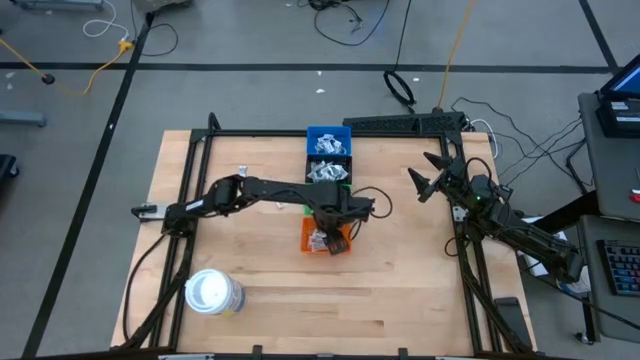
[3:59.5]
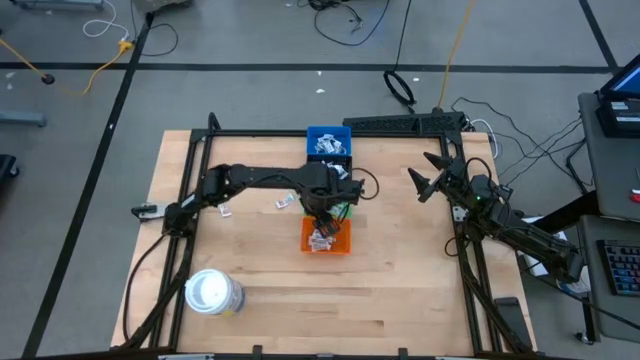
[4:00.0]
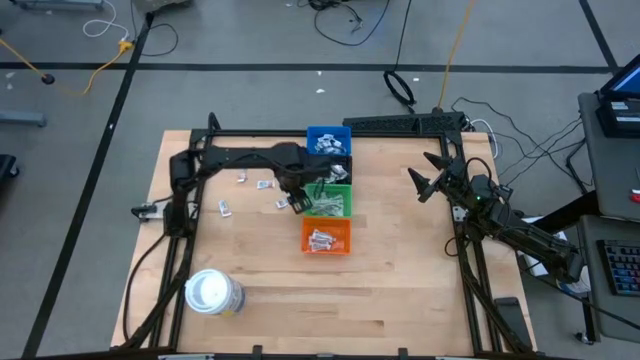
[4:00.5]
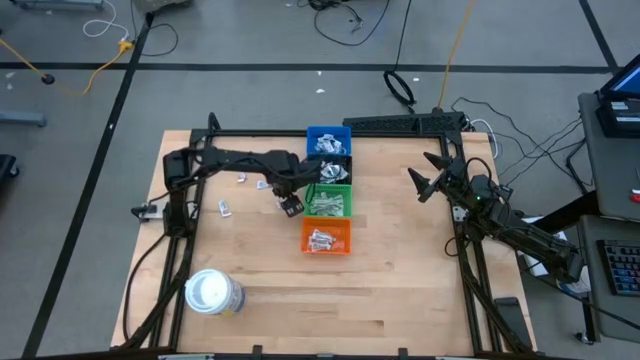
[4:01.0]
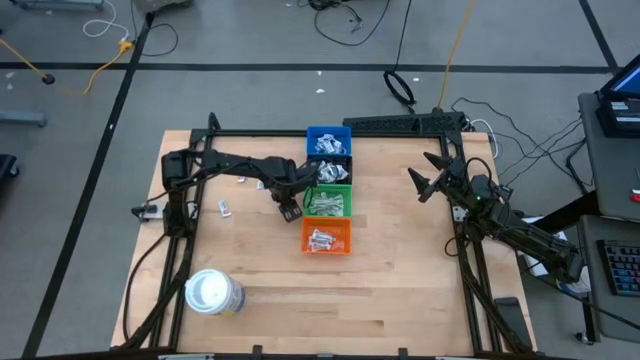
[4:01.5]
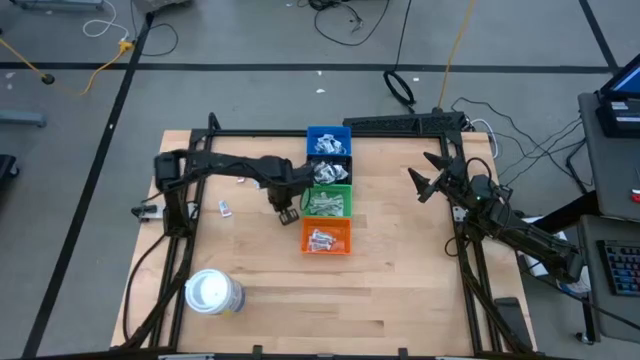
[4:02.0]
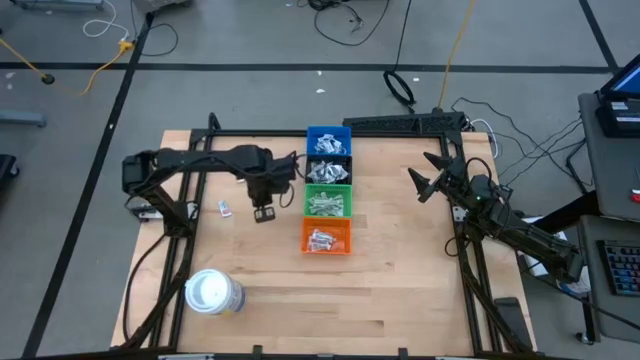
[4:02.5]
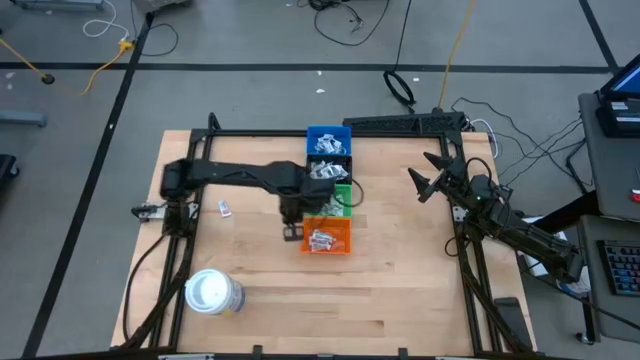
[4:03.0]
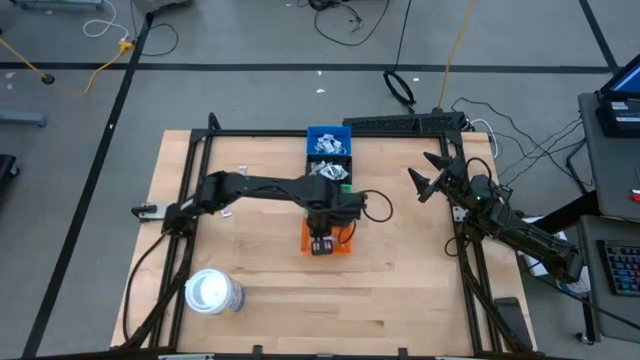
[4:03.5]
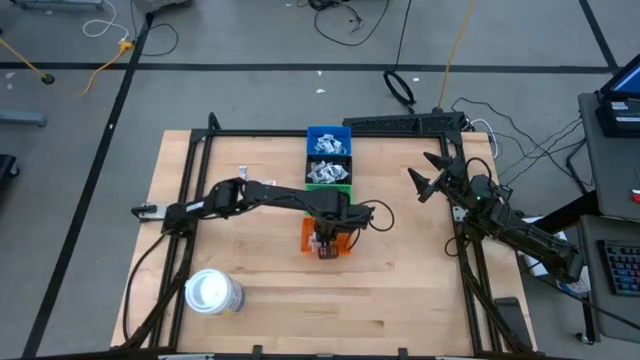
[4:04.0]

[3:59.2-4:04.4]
Task: Pick & Place First Aid Supplies
Put the orange ointment pack into the orange bin

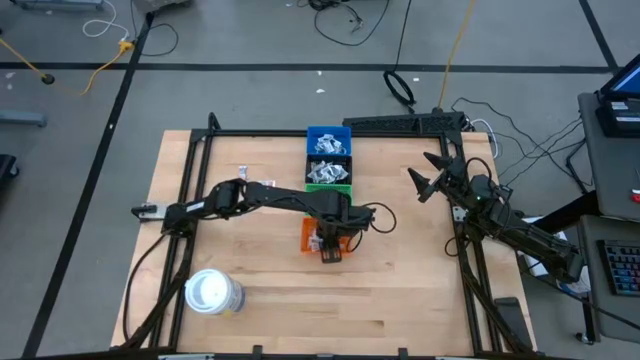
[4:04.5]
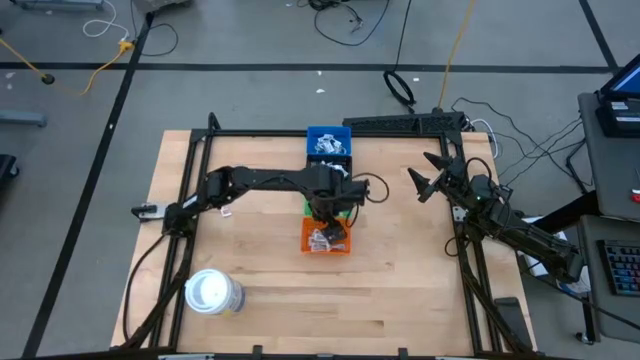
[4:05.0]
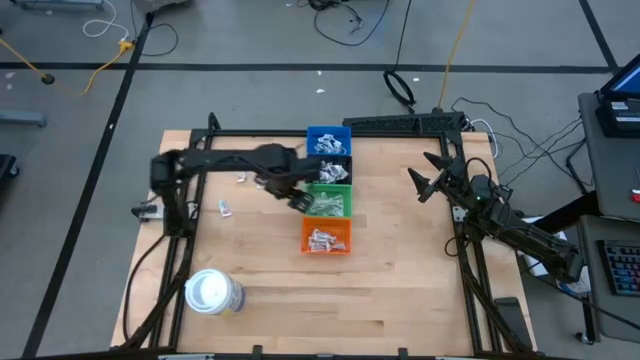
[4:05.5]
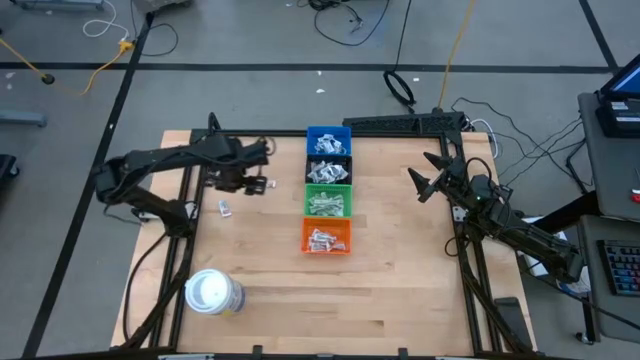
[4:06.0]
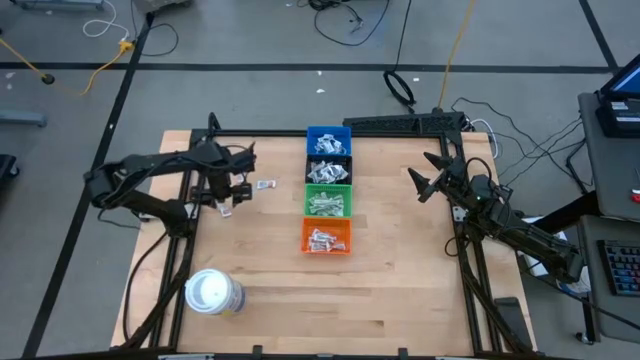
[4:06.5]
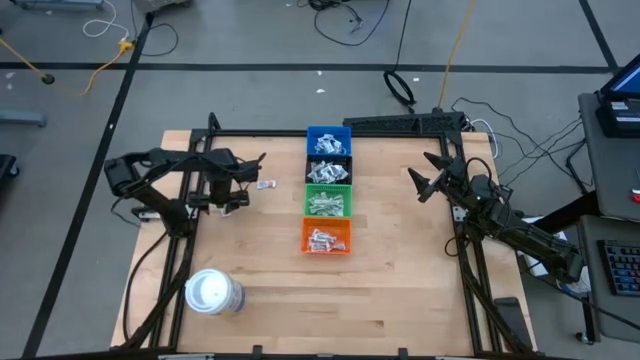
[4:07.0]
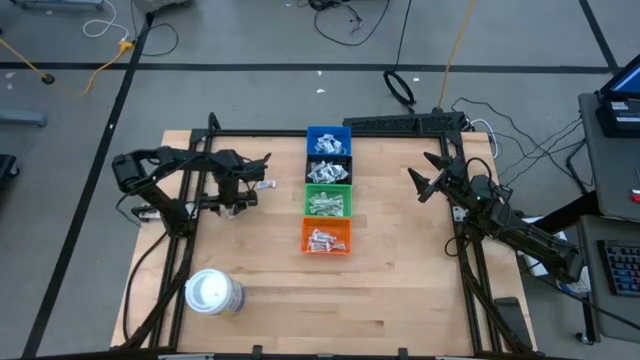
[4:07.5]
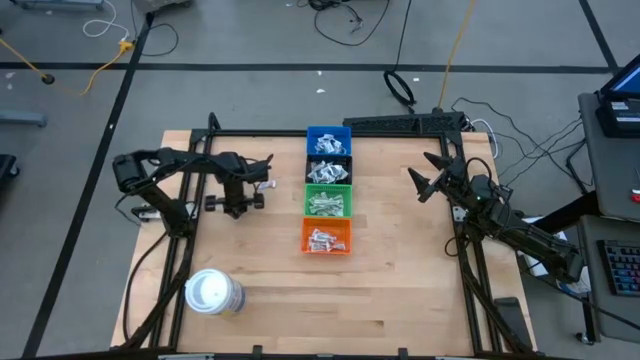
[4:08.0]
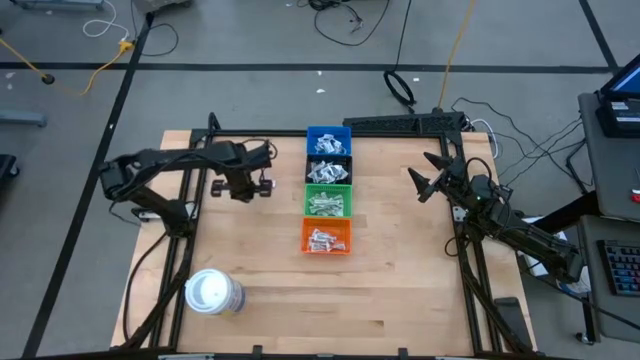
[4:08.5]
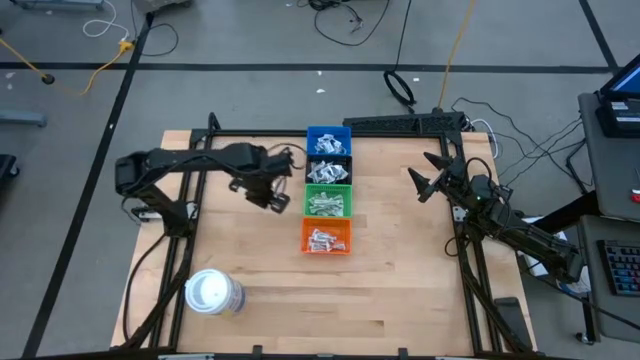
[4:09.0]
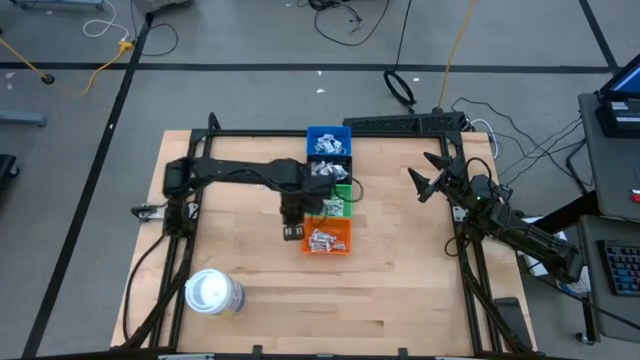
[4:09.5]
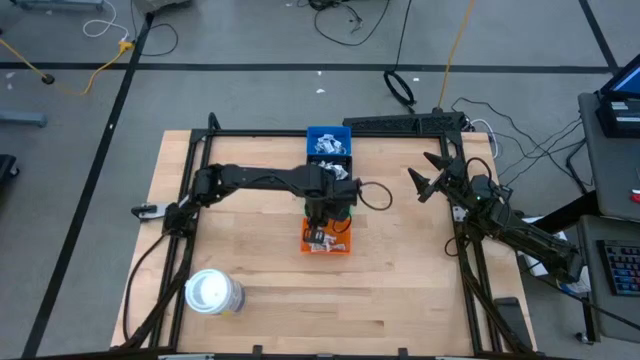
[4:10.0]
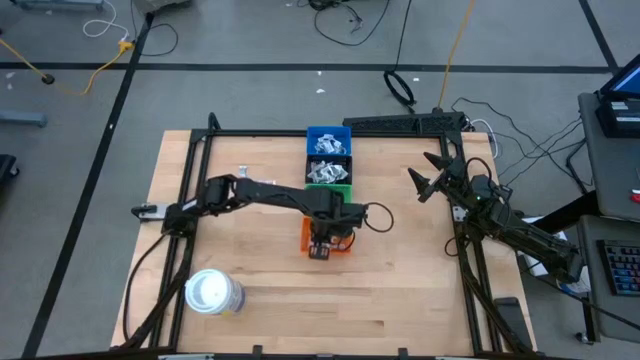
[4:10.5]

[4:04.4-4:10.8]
Put the orange ointment pack into the orange bin

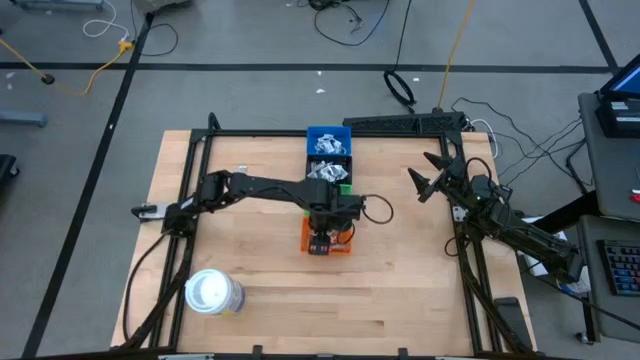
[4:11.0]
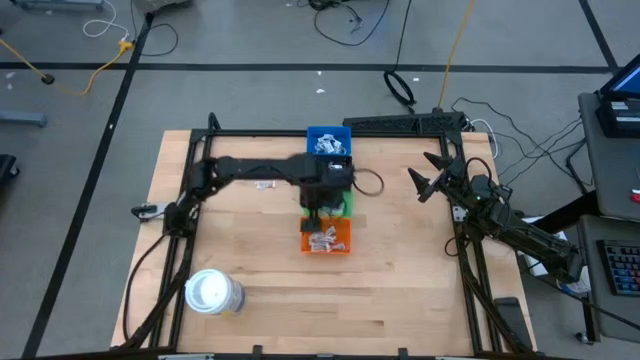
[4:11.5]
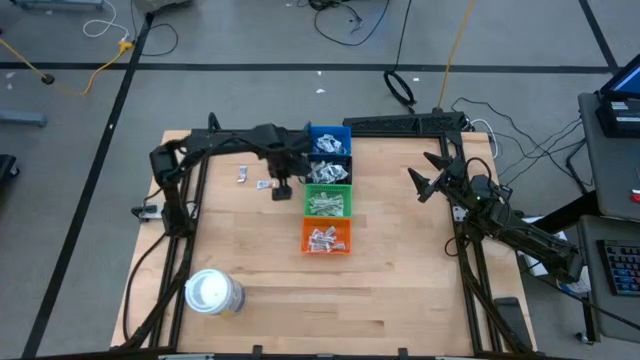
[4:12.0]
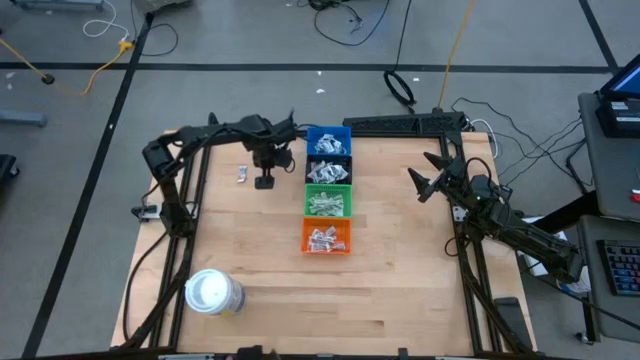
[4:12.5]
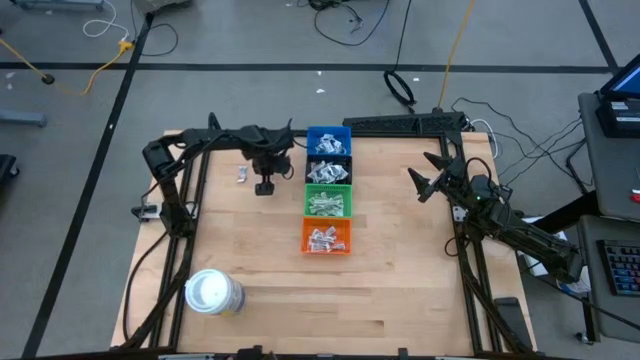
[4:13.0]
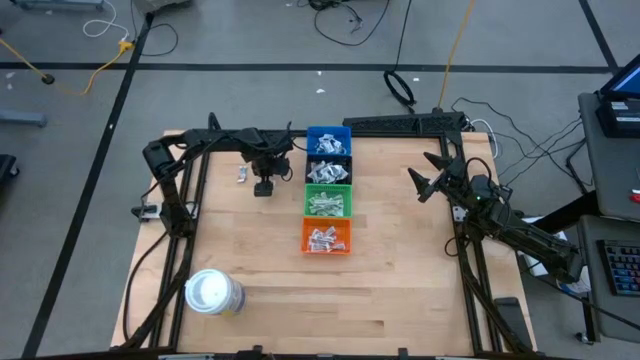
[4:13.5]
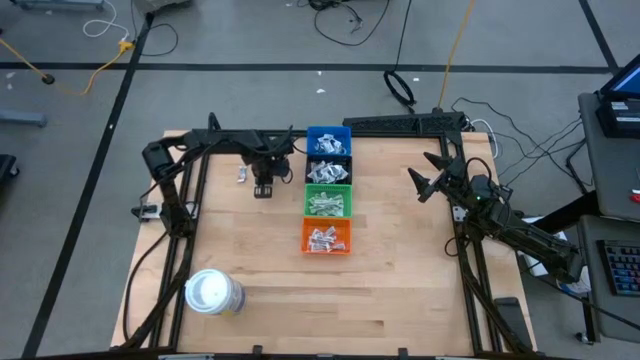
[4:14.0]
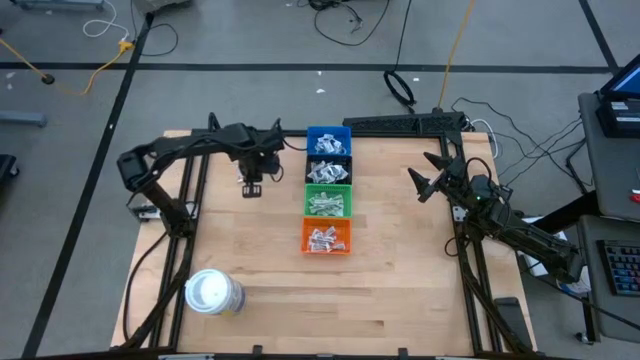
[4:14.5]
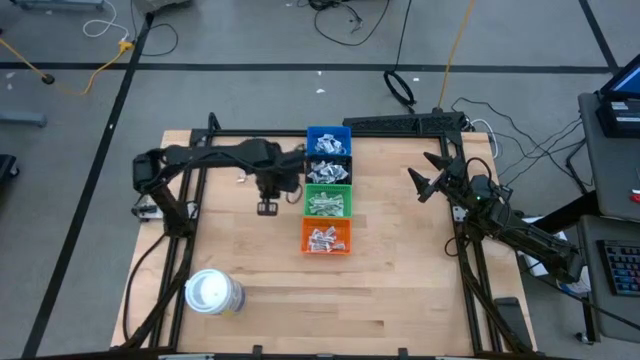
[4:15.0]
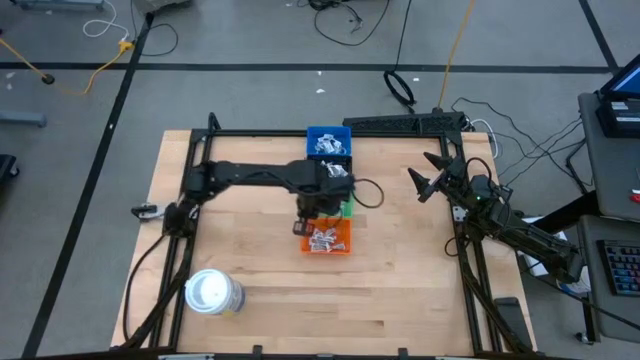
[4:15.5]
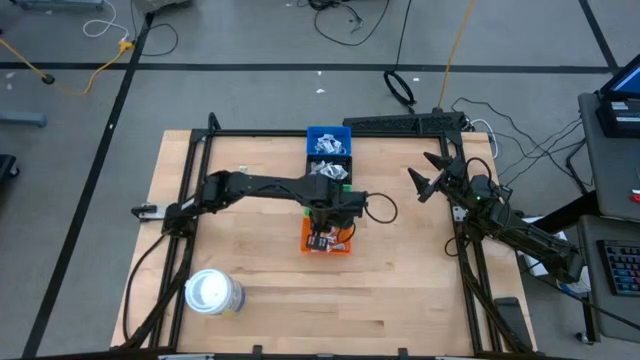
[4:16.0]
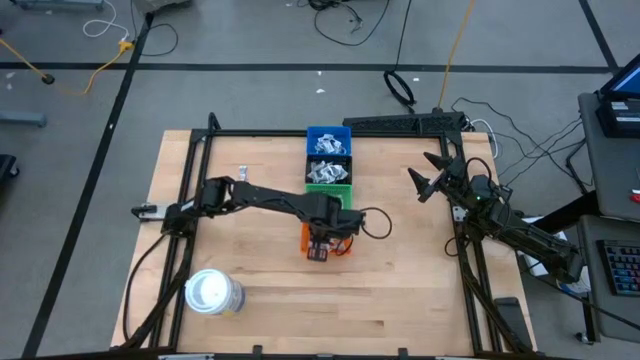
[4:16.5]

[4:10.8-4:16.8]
Put the orange ointment pack into the orange bin

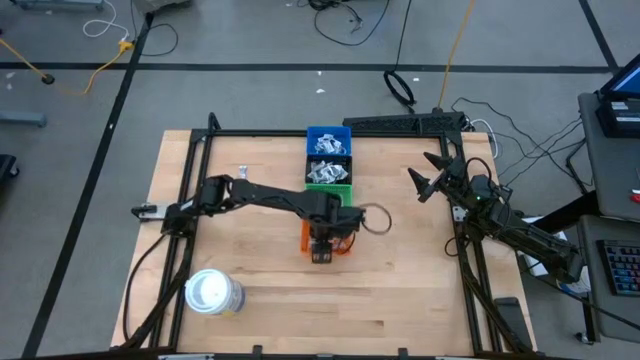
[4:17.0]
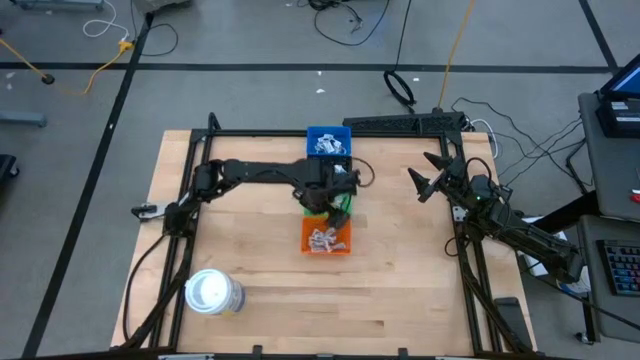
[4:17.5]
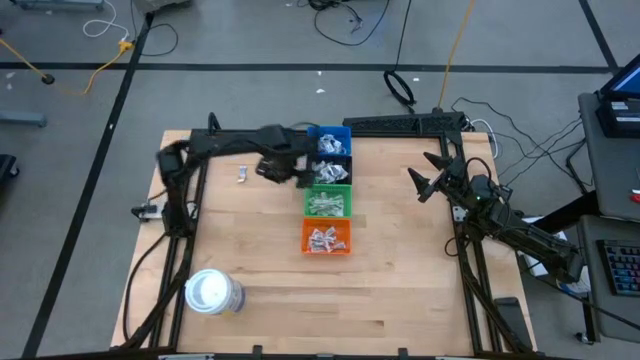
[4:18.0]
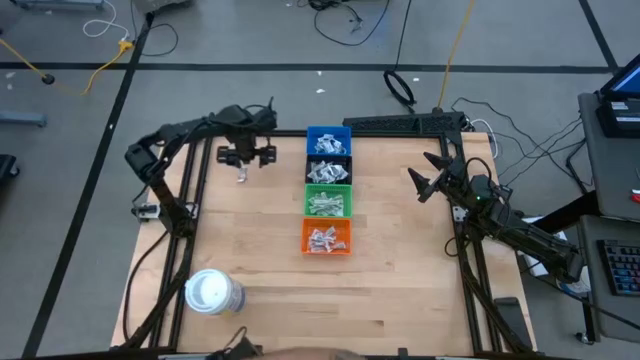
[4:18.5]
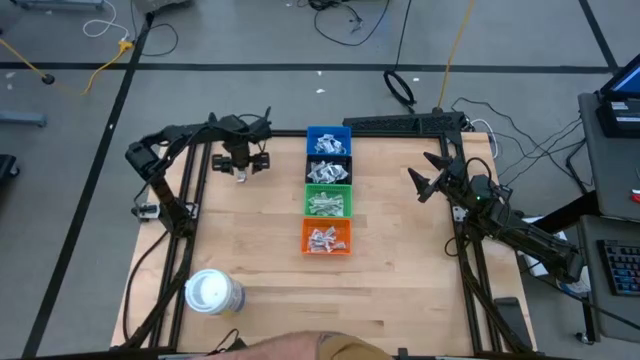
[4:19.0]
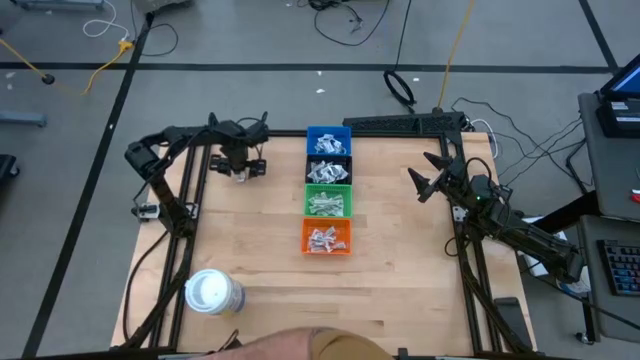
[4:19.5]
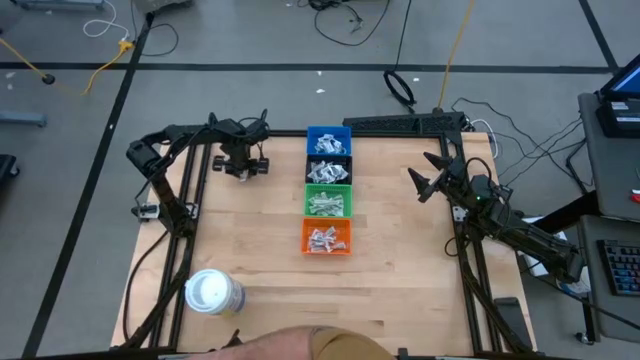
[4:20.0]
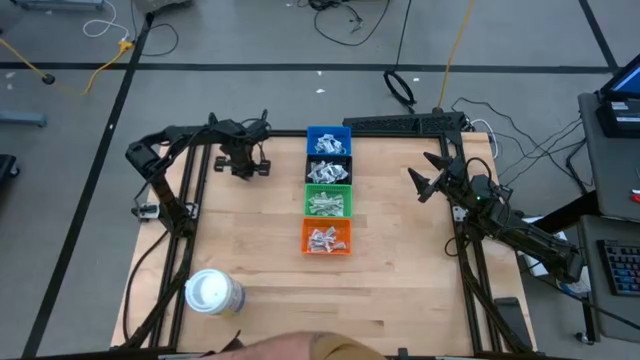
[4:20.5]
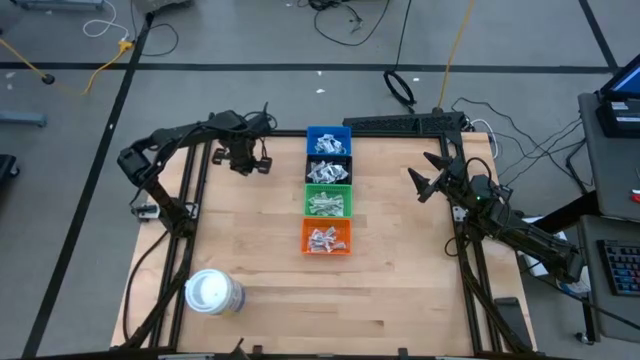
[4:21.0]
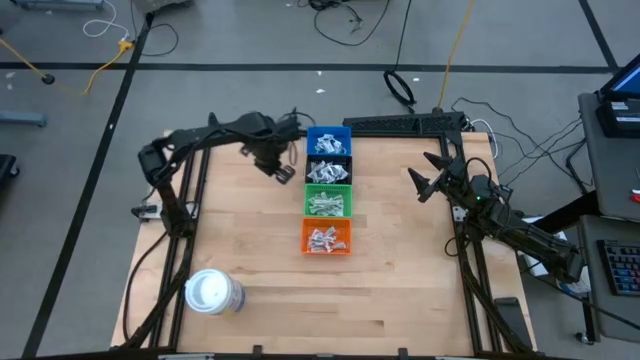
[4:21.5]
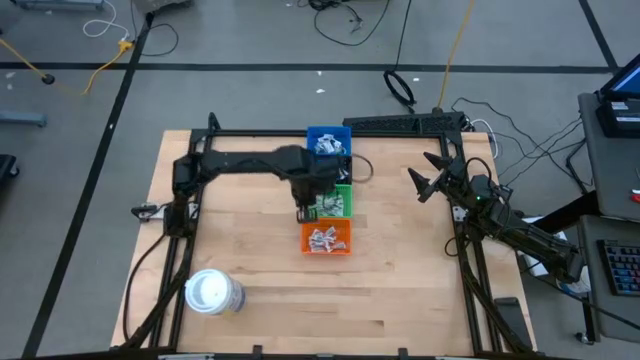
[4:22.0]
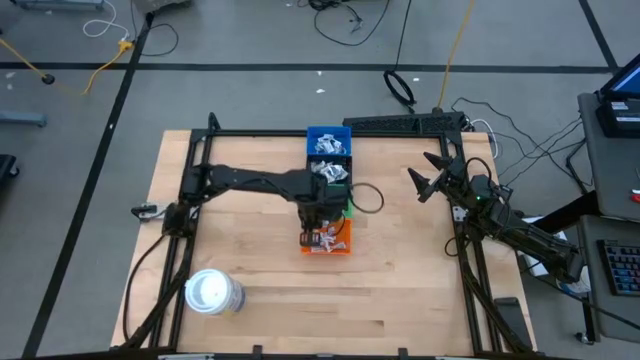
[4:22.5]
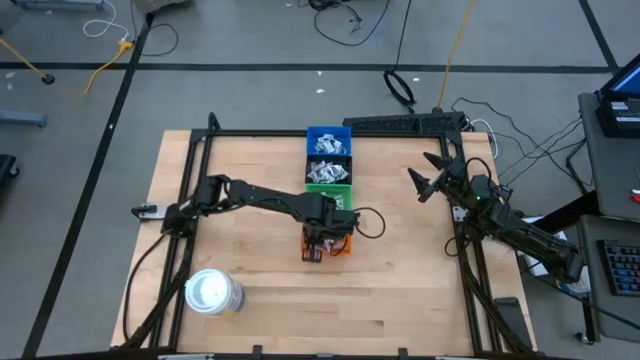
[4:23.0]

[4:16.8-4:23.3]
Put the orange ointment pack into the orange bin
